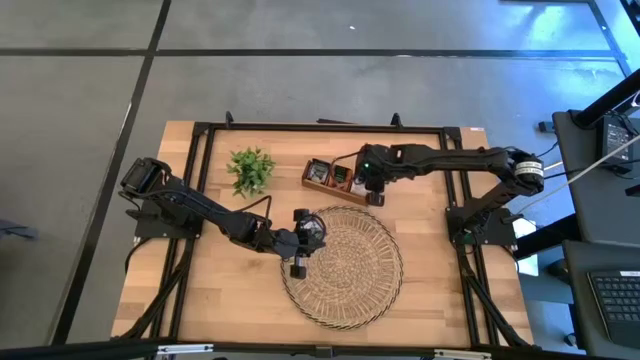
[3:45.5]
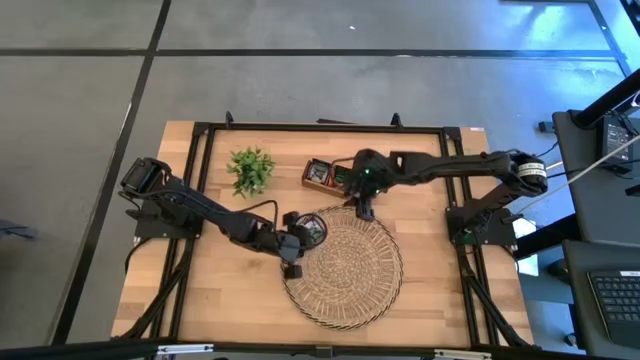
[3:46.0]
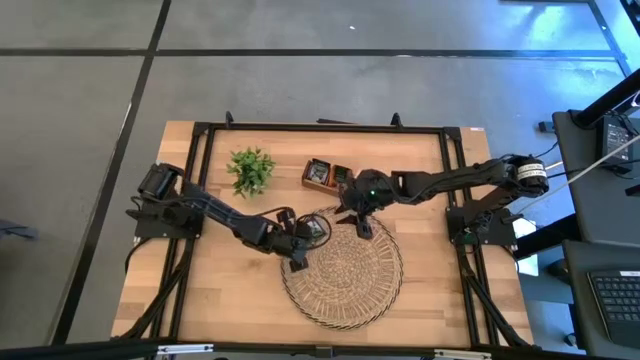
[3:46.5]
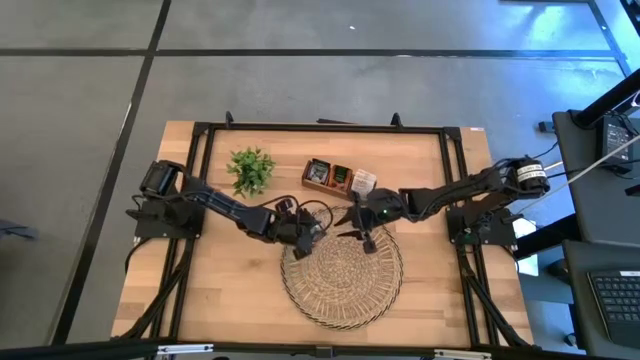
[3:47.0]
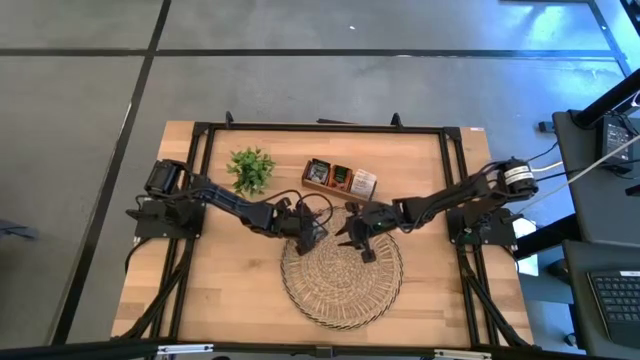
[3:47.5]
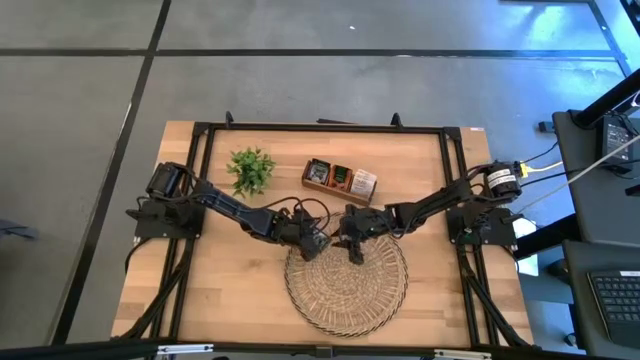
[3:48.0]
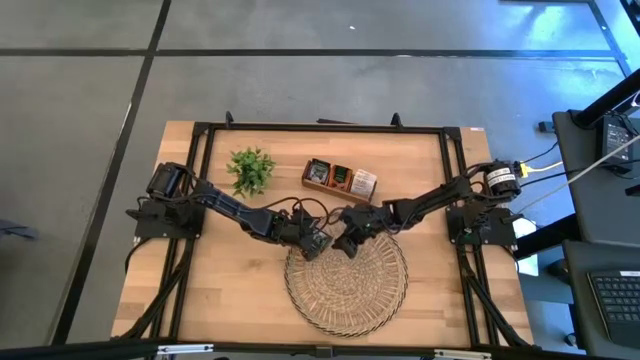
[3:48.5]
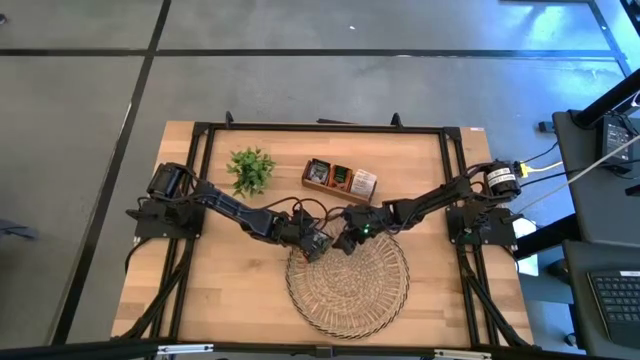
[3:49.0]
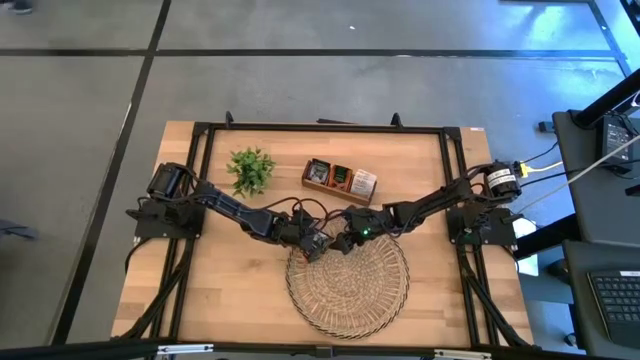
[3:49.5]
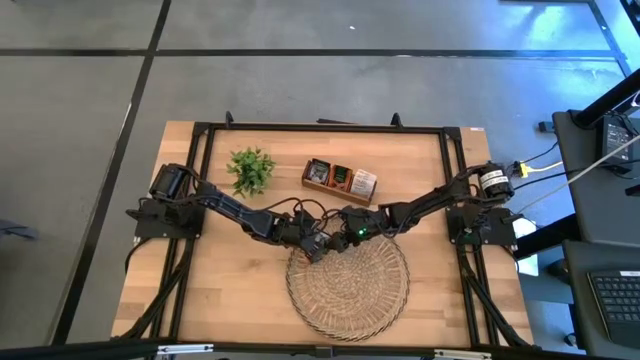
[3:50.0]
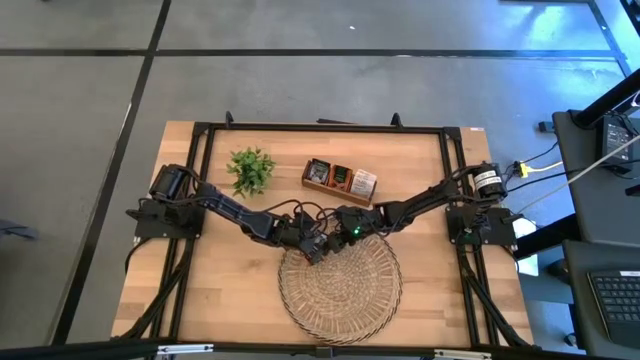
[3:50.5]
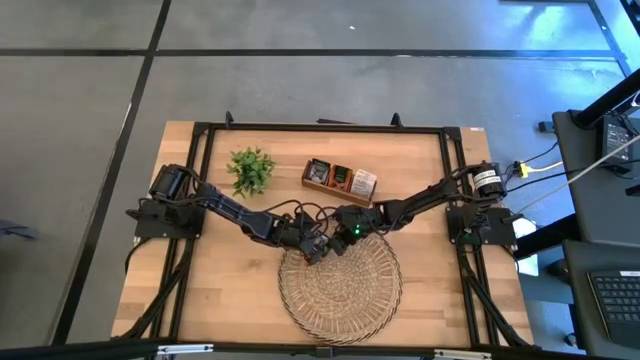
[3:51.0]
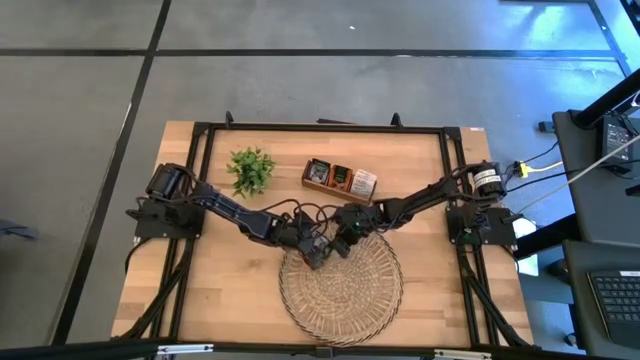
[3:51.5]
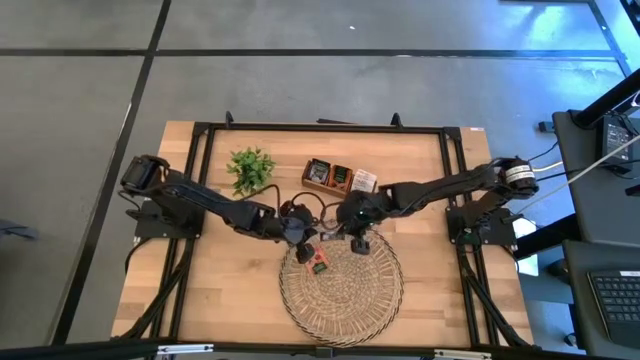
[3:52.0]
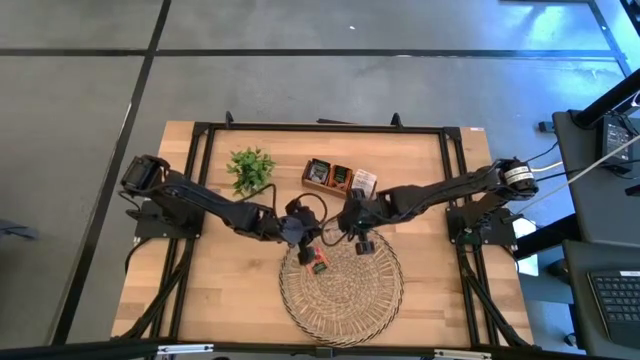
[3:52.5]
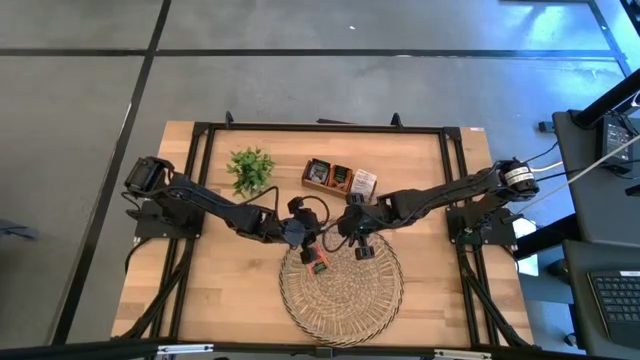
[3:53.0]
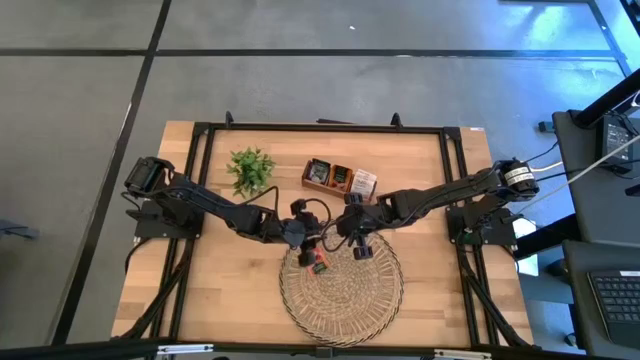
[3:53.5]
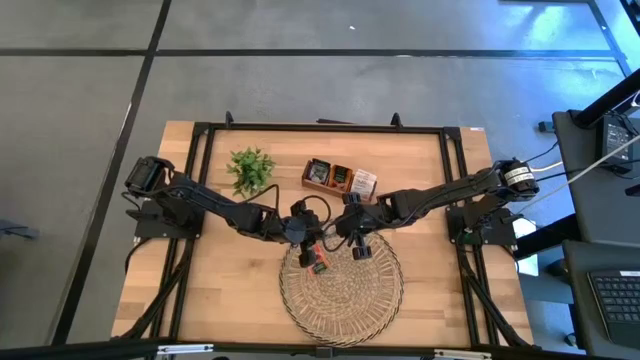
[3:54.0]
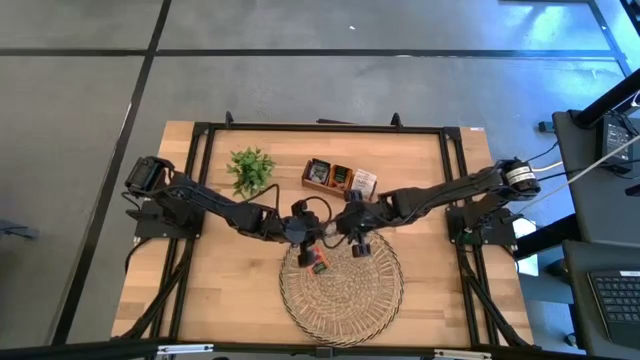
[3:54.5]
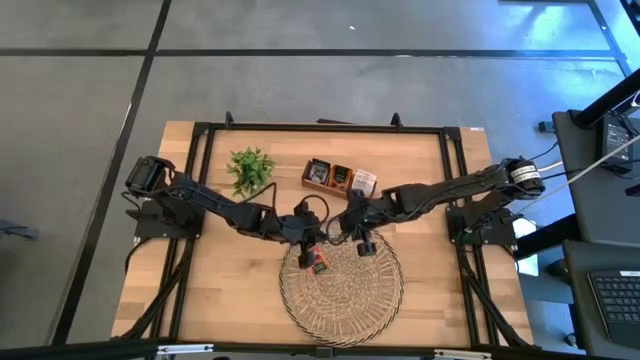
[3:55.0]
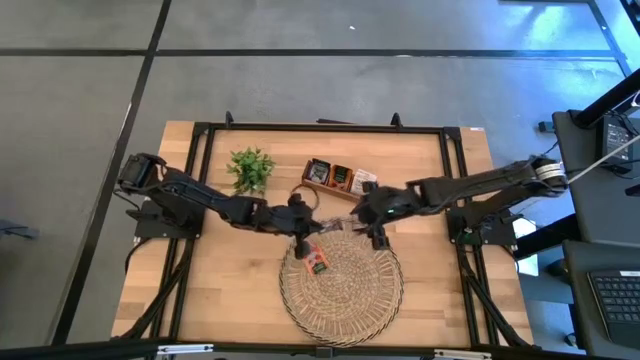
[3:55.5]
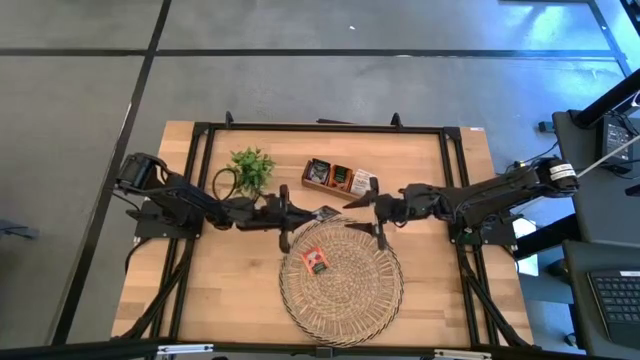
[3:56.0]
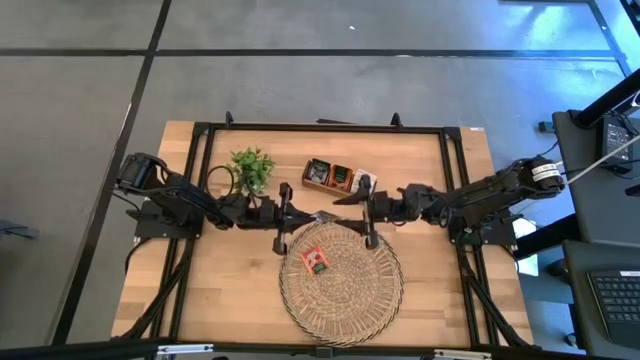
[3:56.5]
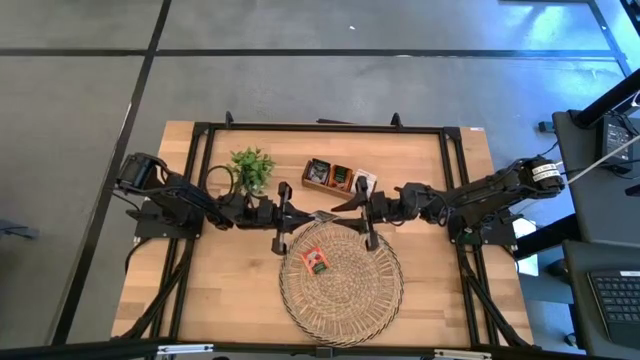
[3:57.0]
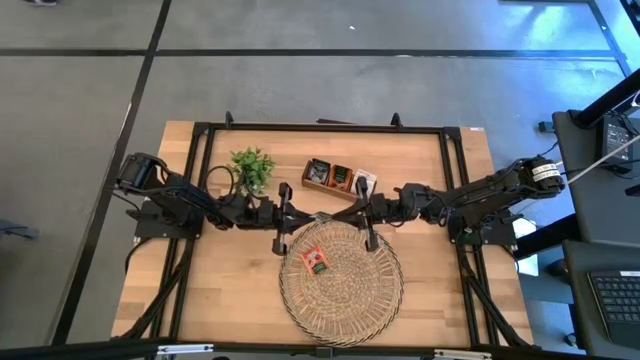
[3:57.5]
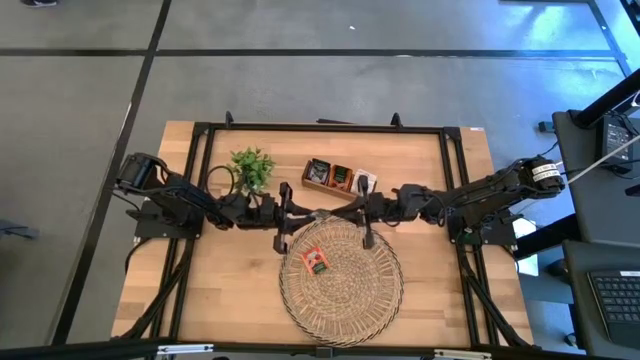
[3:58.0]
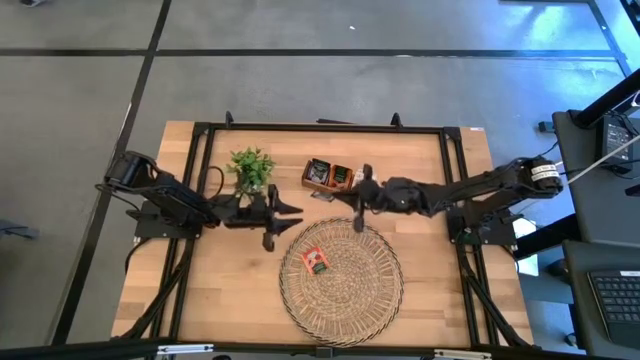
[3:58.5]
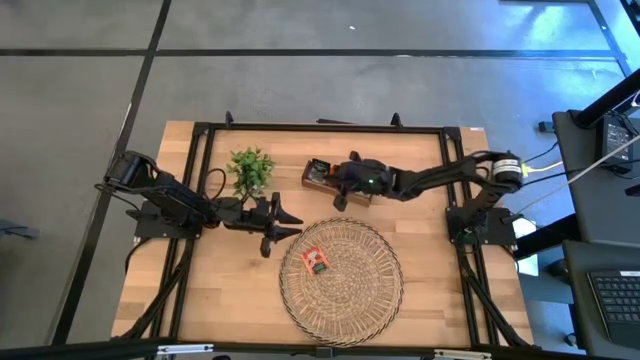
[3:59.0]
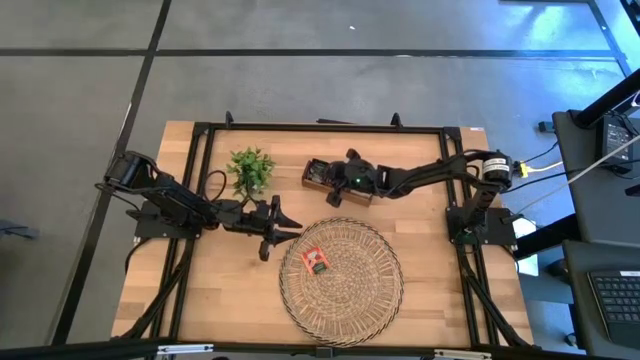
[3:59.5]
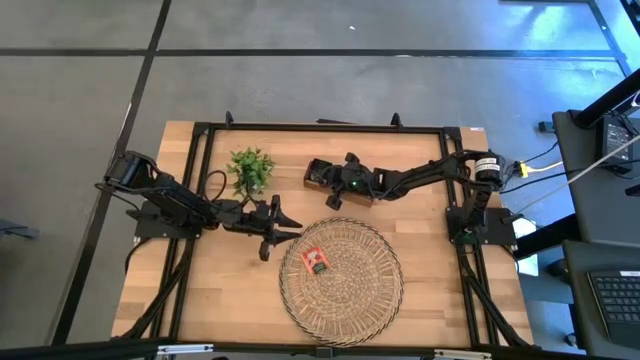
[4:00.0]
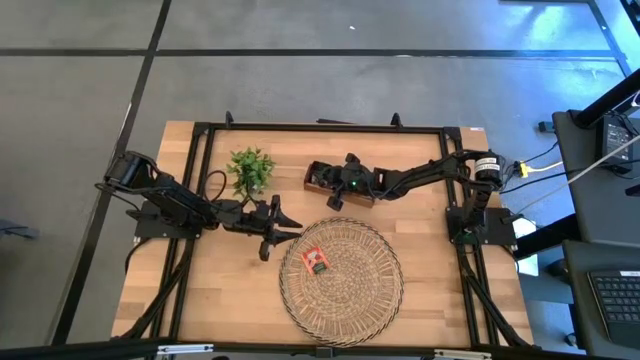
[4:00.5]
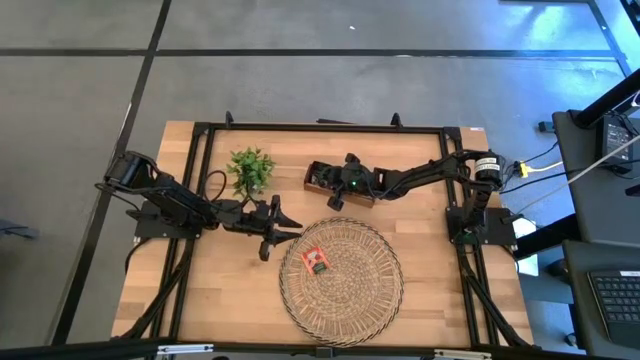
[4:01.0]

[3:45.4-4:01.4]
Task: Pick & Place Tea
Put the black and white tea bag into the left section of the wooden organizer

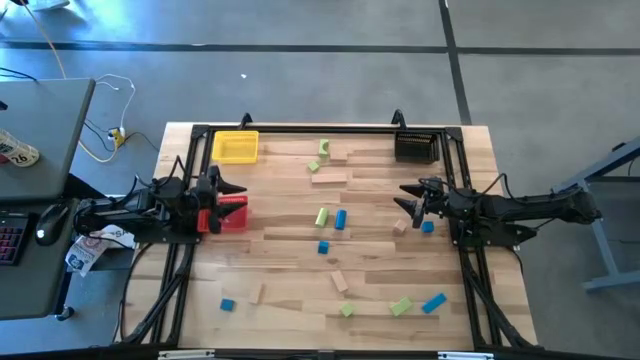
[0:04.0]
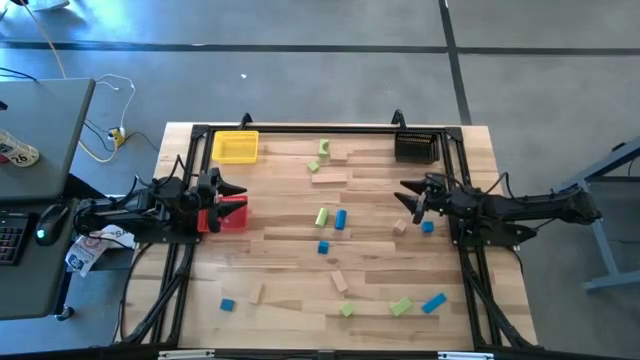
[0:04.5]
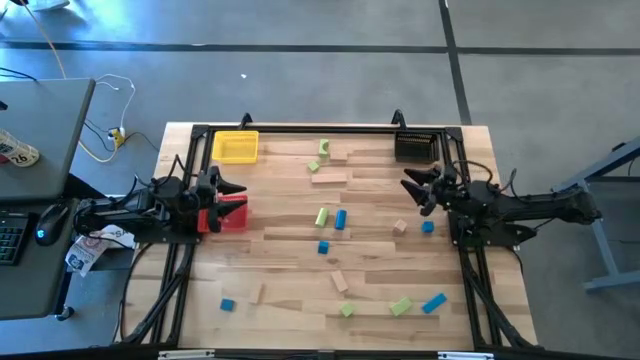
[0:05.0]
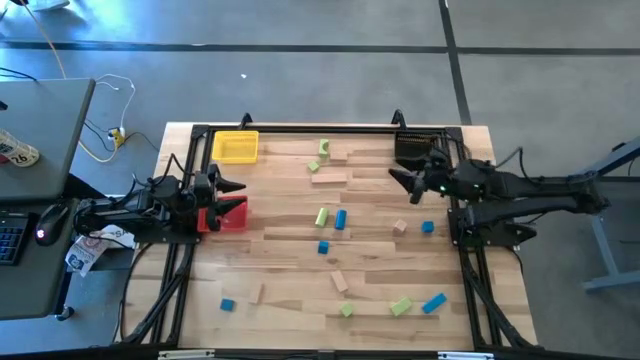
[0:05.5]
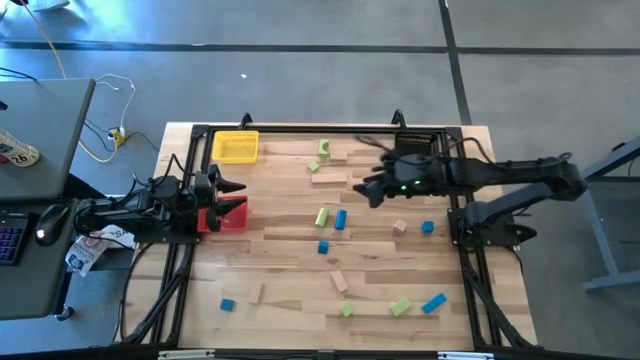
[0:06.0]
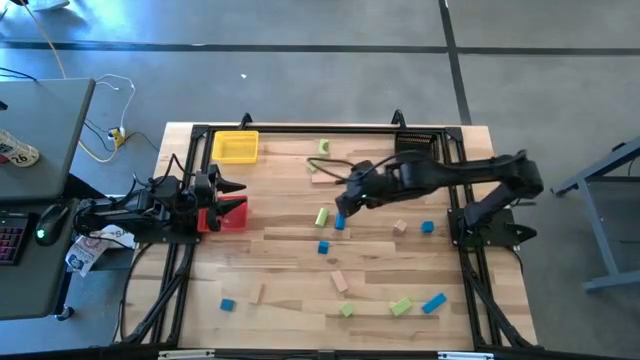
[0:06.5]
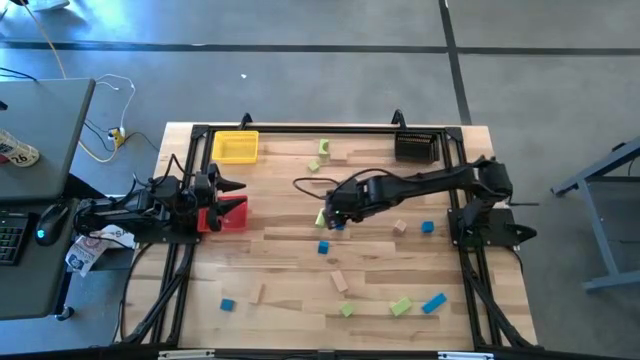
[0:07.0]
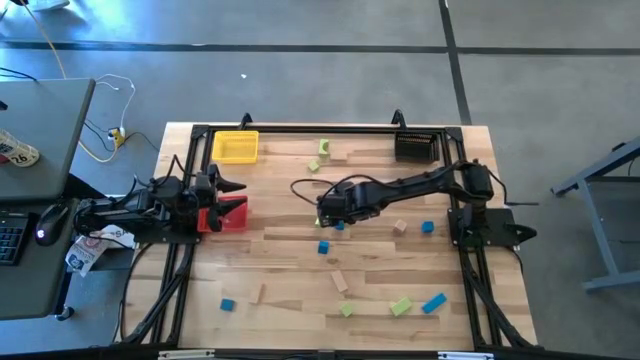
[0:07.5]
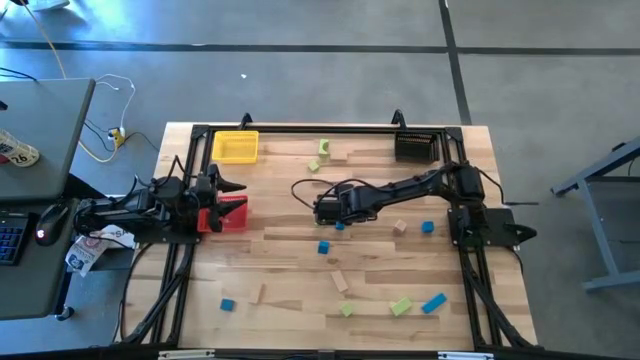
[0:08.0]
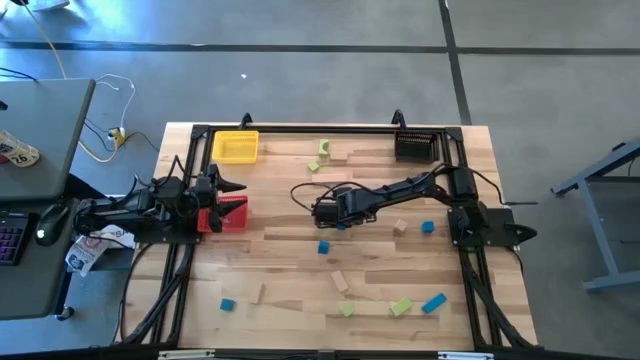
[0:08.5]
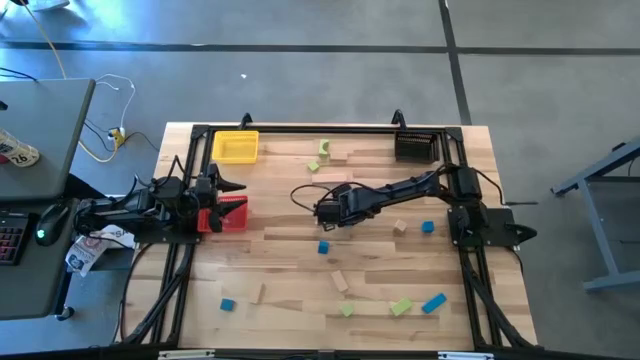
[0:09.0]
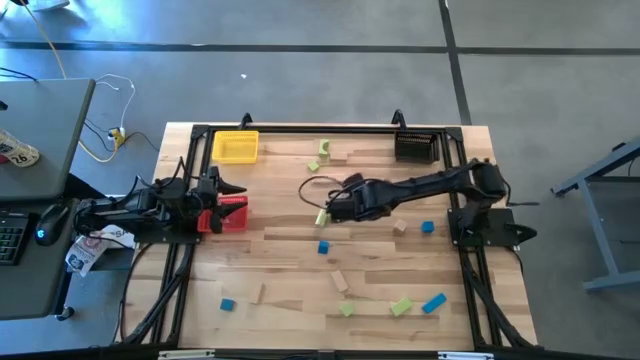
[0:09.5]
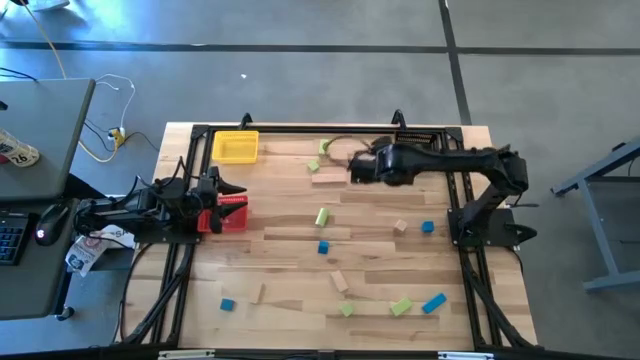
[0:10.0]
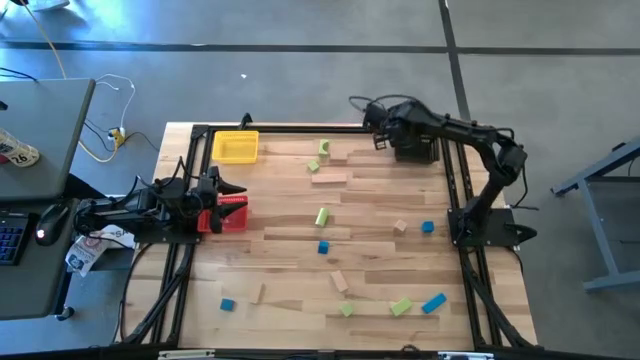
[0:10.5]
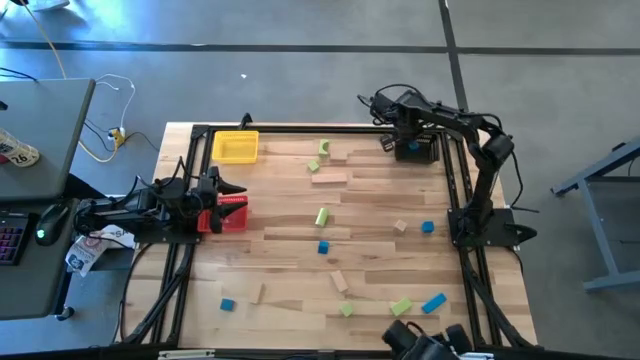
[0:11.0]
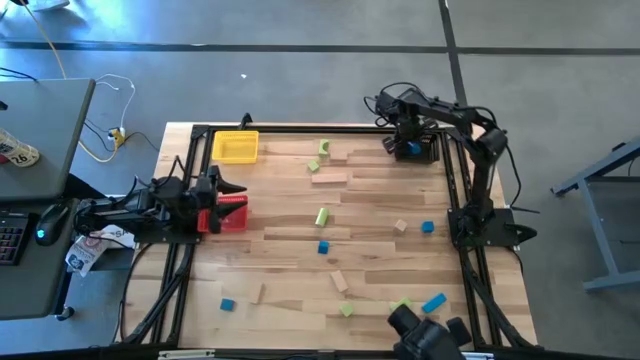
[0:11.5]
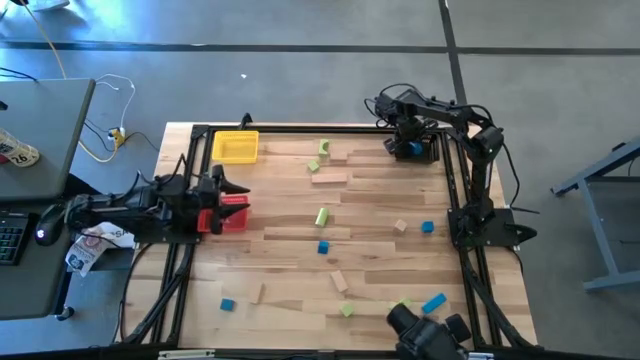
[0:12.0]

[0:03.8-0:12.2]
Task: Sort & place blocks by color
Put the blue block into the black bin
